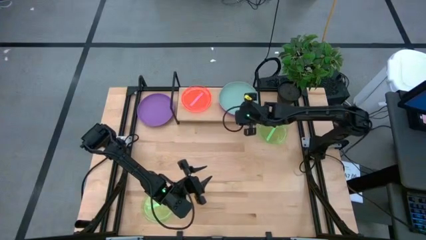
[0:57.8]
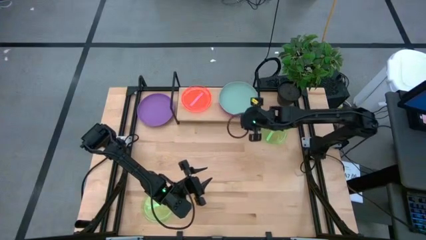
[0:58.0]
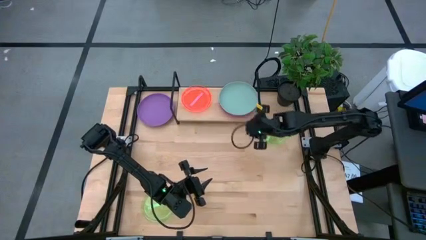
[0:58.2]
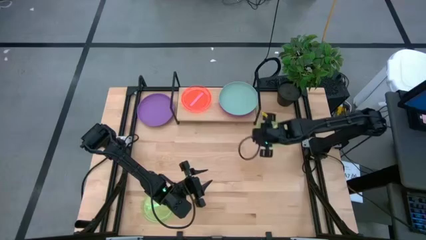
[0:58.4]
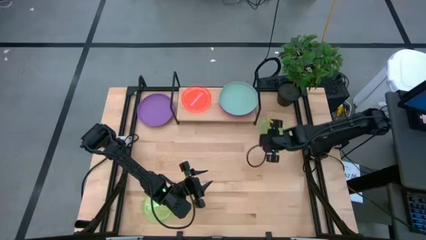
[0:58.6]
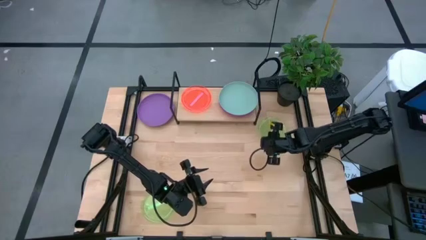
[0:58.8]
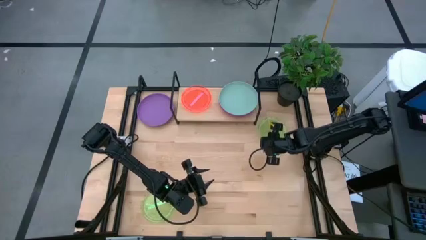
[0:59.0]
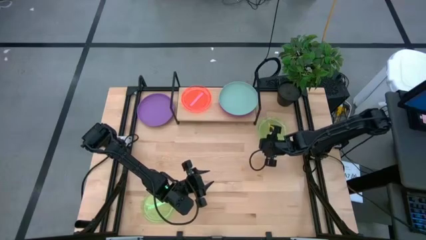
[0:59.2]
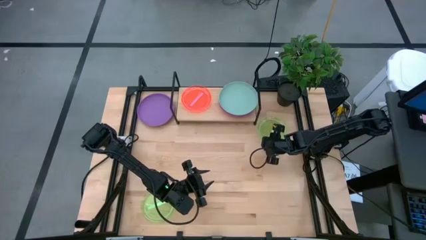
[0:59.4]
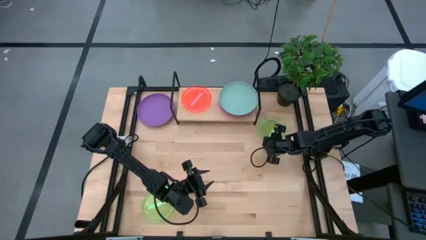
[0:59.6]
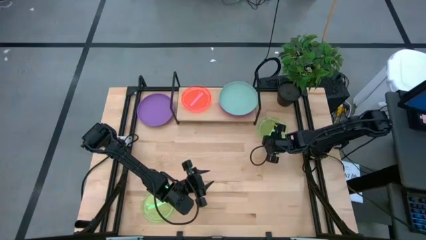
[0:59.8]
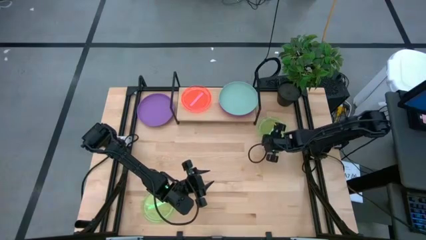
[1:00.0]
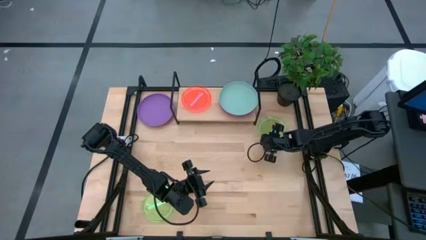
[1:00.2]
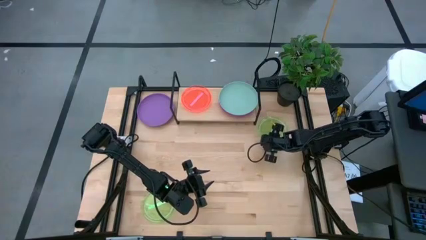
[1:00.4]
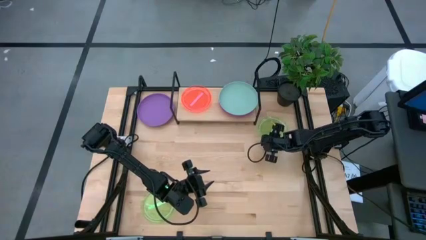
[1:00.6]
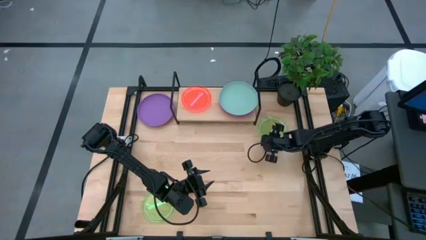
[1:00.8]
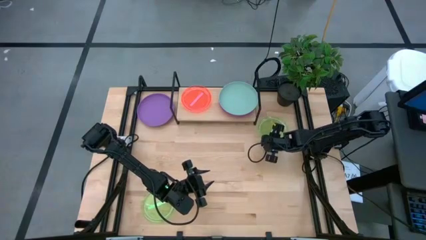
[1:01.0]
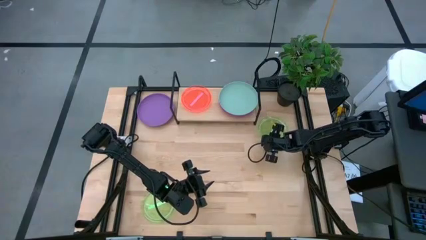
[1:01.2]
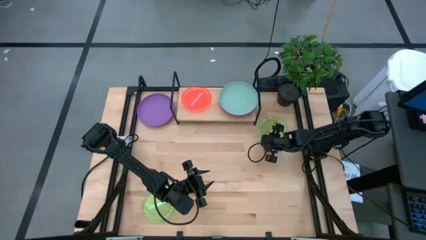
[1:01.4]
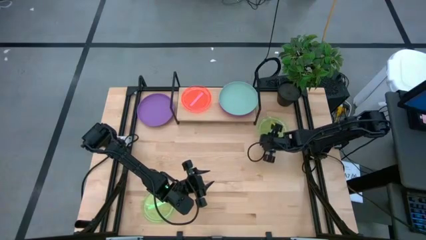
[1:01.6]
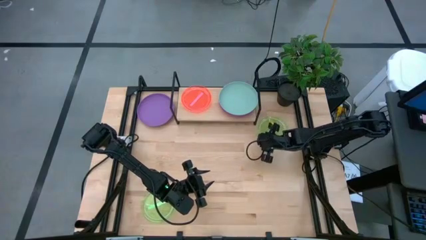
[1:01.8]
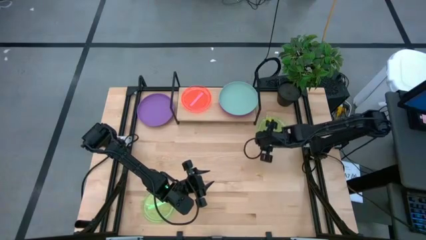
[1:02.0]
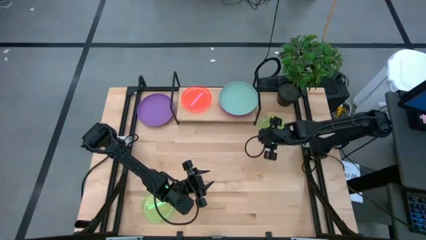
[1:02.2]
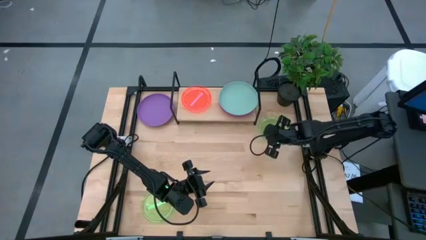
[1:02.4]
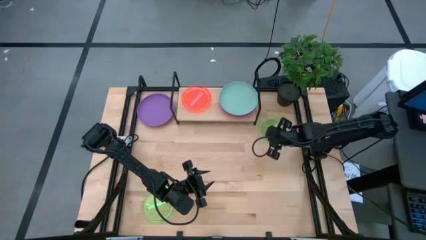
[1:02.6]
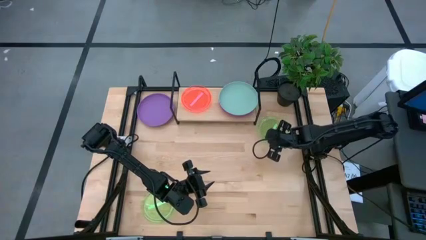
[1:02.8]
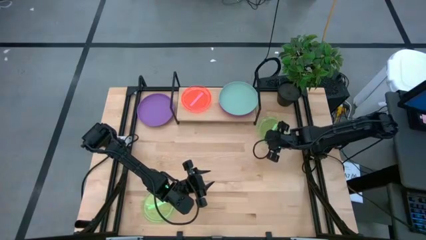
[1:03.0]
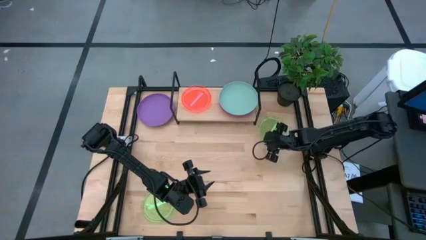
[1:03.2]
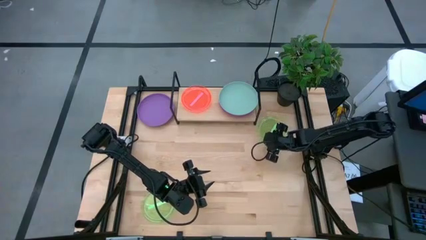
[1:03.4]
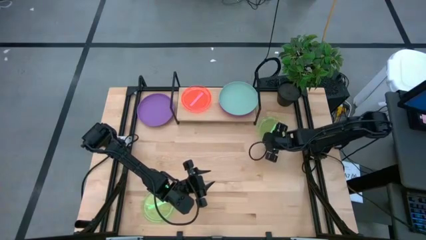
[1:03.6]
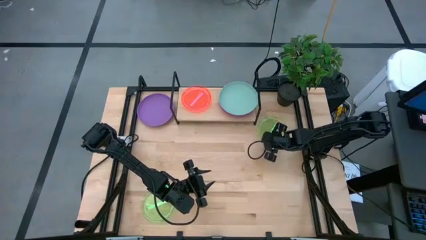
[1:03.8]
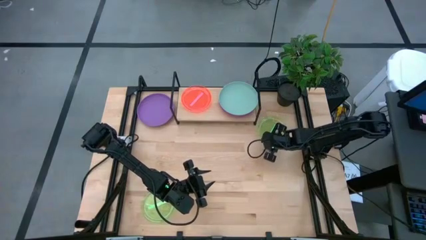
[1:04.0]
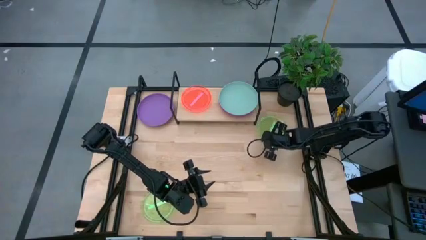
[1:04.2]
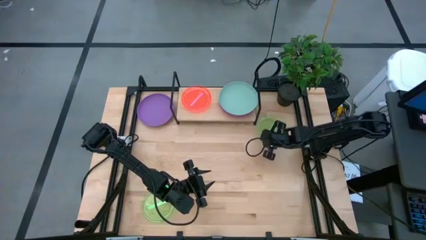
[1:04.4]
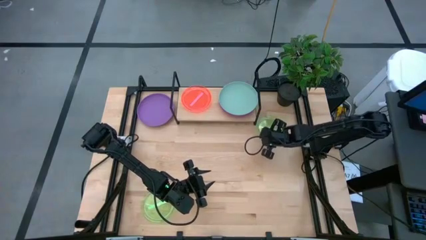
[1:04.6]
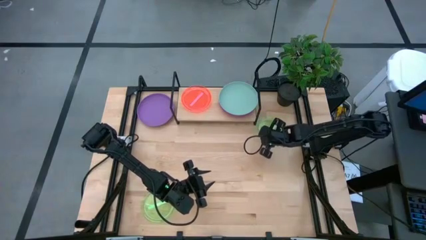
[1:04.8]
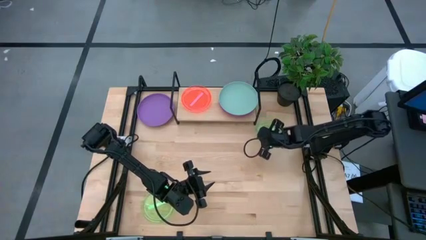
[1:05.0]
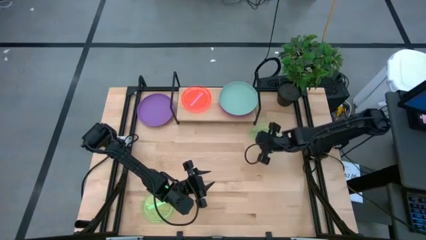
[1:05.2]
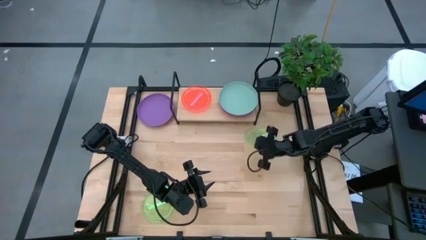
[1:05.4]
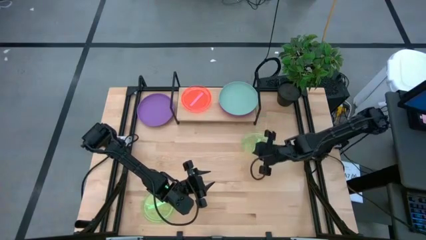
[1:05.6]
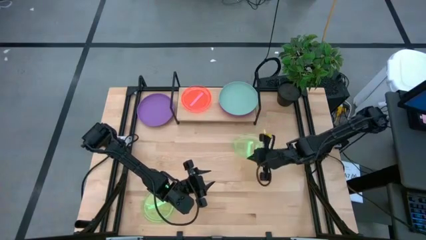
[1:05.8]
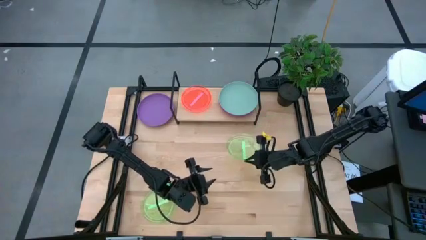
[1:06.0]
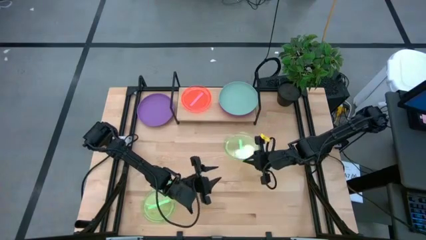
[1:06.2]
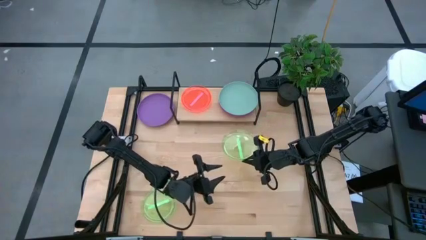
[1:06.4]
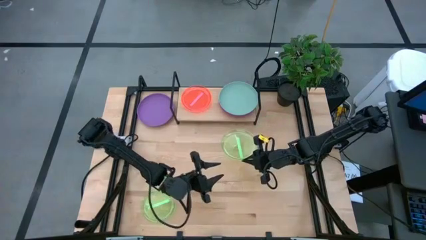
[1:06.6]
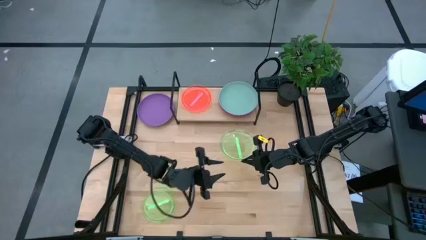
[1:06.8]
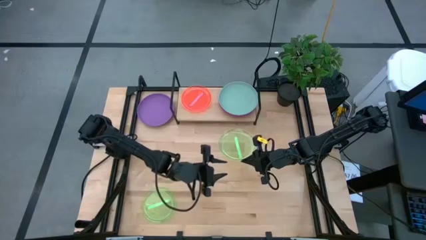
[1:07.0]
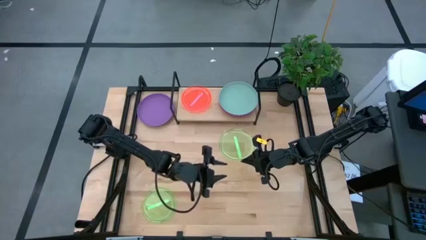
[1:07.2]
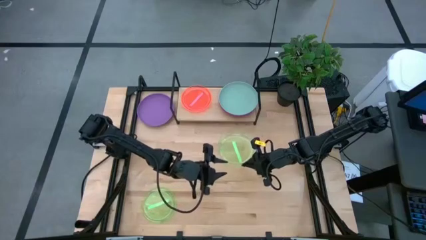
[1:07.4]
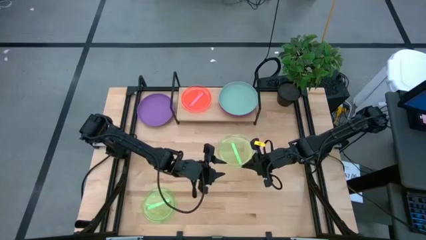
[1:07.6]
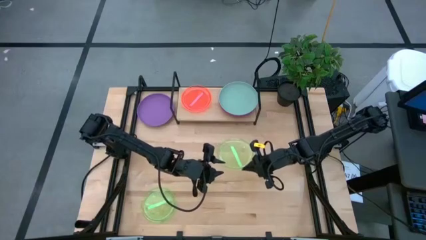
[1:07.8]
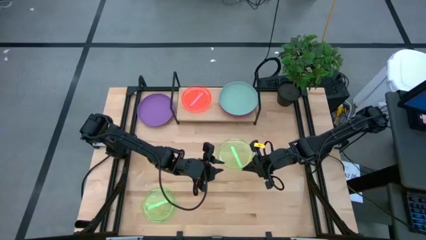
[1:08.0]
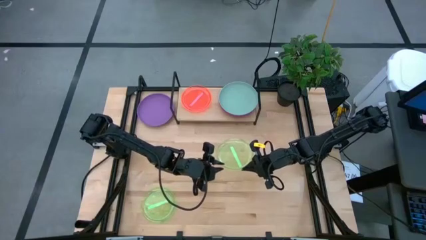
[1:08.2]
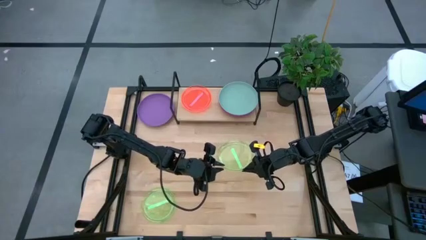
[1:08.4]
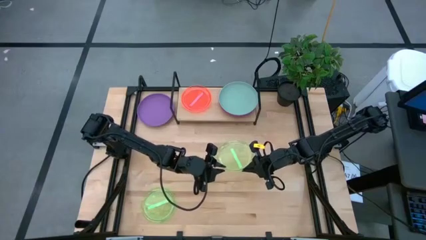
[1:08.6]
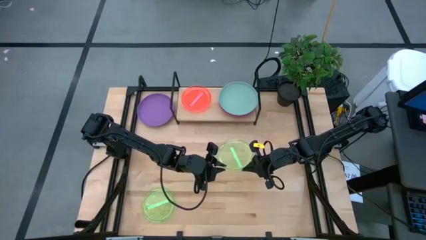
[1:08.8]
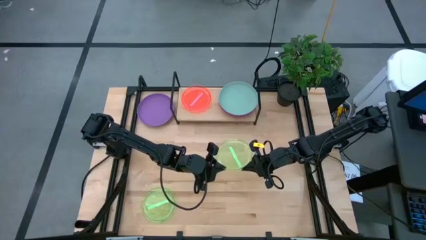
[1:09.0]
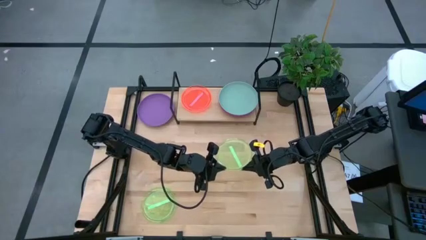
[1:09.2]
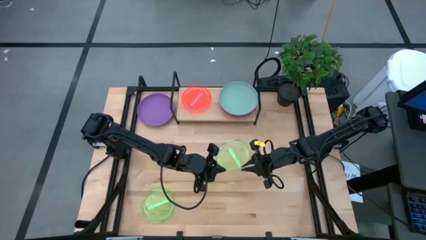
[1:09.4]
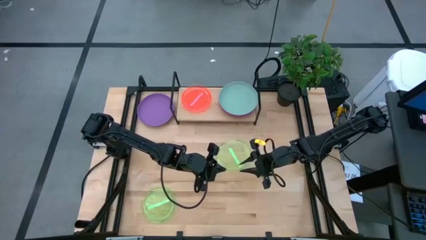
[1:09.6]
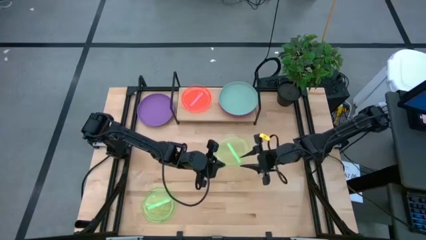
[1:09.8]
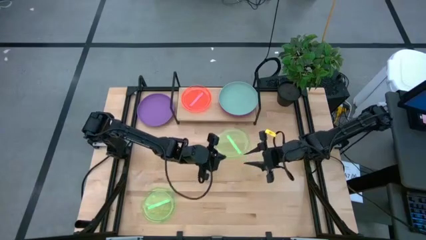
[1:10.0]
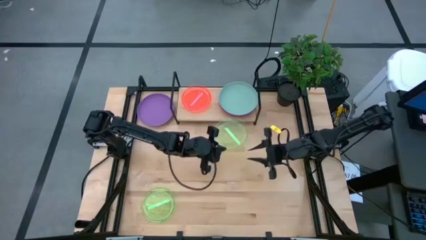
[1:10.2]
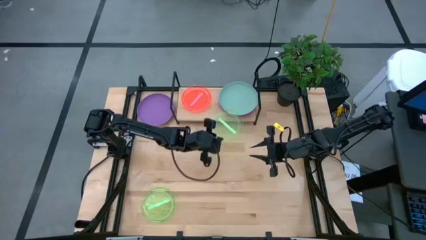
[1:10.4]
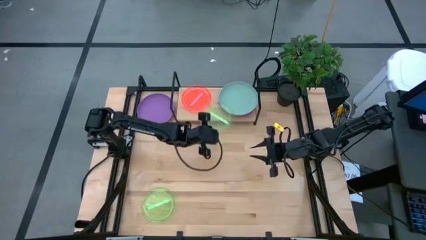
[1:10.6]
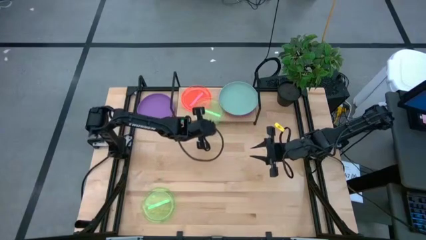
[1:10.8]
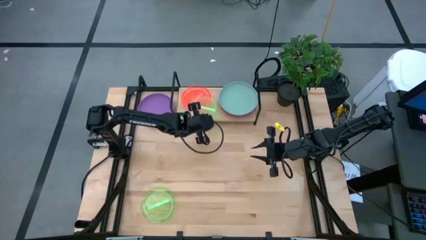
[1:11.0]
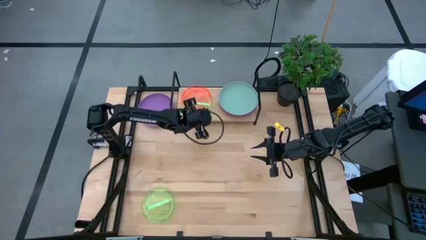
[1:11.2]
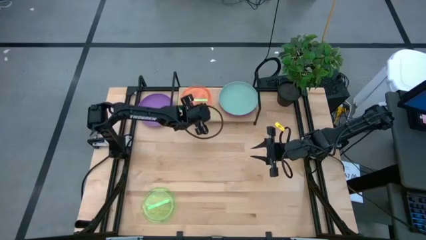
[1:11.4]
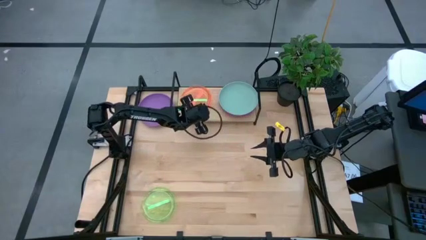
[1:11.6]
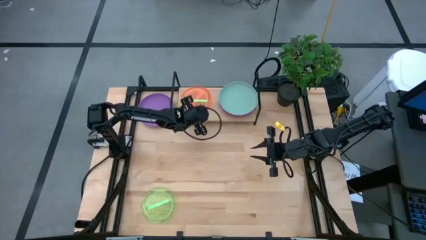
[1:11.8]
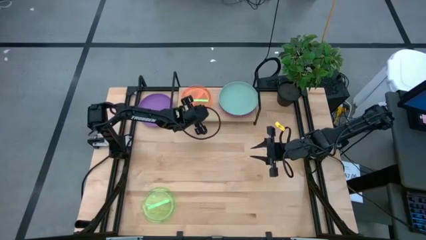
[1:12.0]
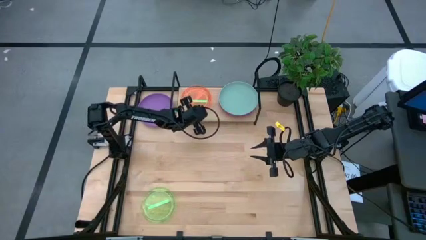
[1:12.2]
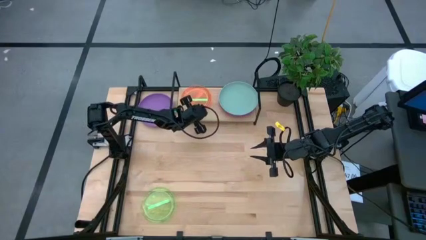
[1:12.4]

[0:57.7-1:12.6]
Task: Place and stack plates onto a shelf
Stack the top small green plate on top of the orange plate

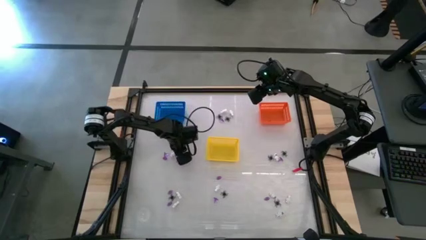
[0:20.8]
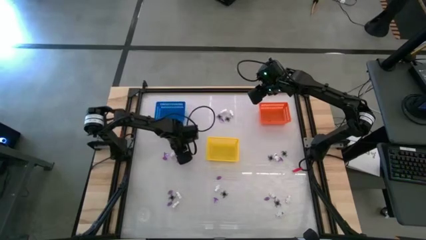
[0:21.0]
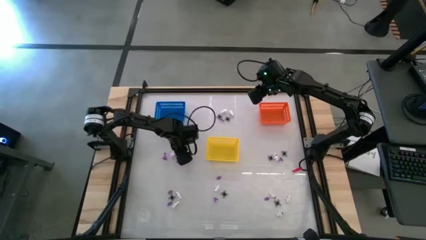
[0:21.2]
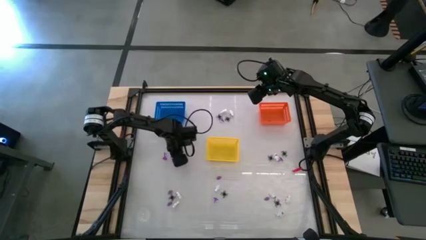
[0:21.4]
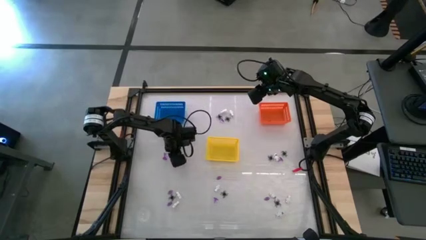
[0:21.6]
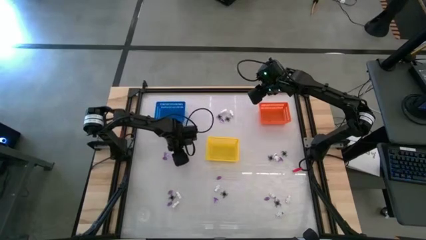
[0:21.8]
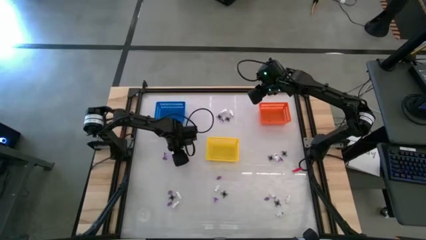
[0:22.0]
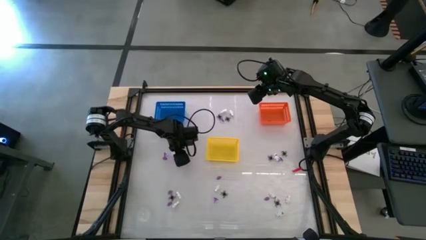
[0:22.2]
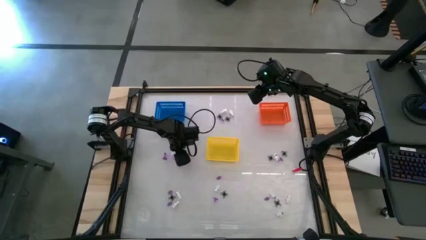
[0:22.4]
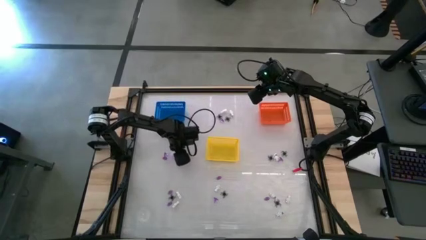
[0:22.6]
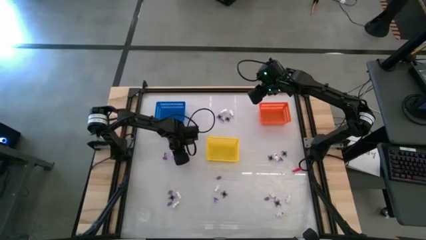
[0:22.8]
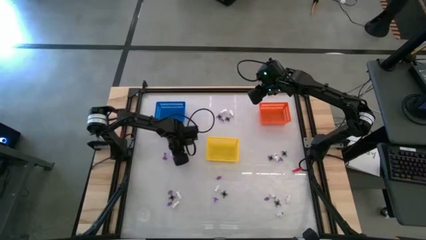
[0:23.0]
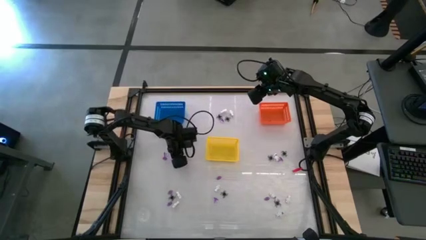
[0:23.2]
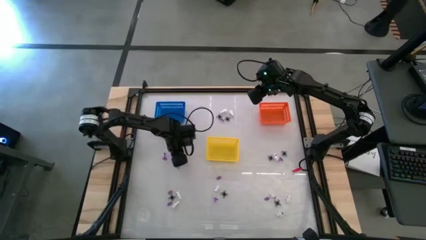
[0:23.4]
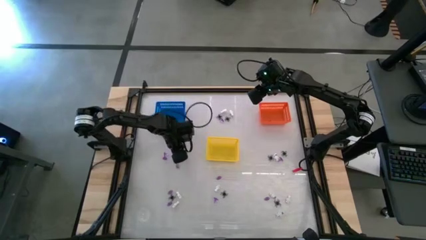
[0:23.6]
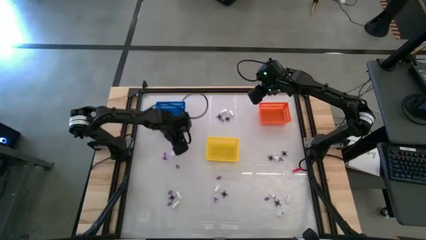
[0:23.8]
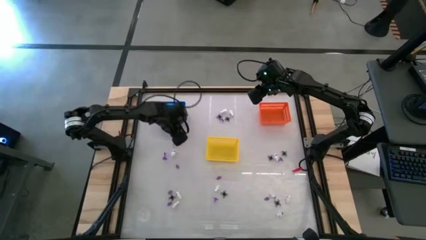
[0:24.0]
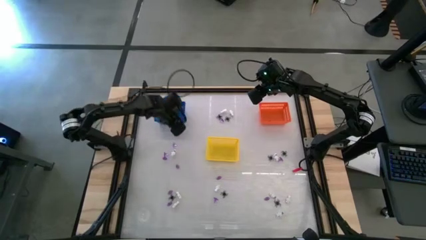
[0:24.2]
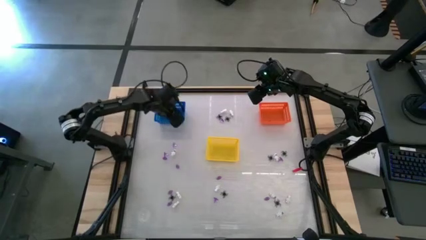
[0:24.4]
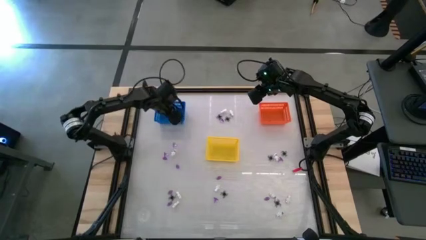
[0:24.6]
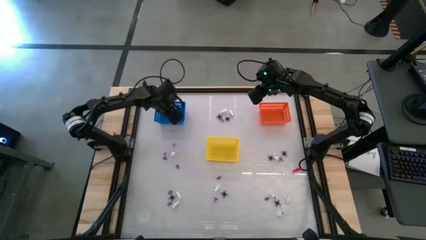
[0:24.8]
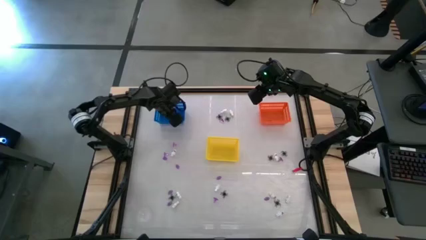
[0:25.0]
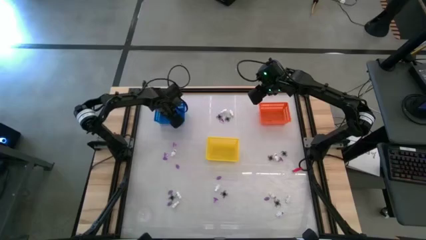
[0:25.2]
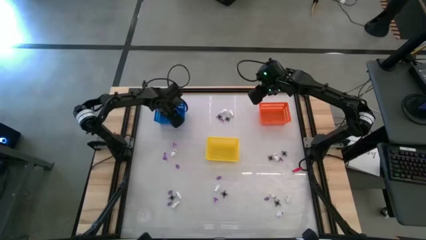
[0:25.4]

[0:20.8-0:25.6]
Task: Sort Halloween decoration
Put the black spider toy into the blue bin
